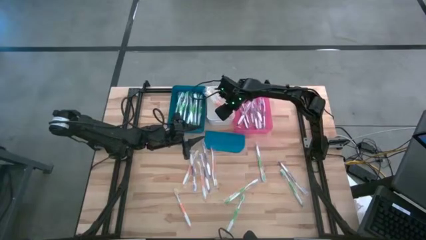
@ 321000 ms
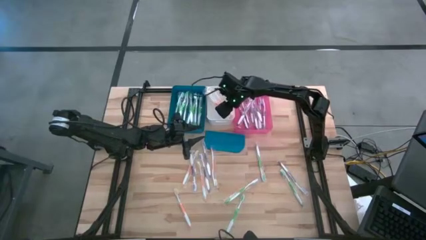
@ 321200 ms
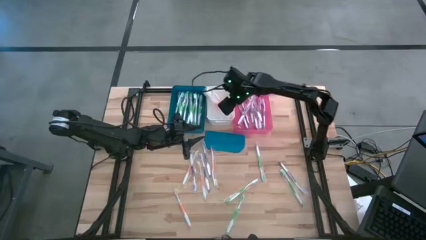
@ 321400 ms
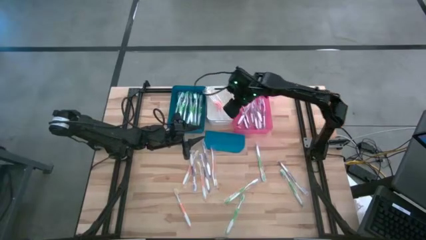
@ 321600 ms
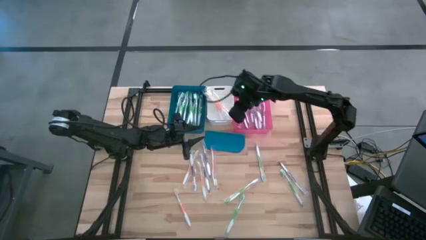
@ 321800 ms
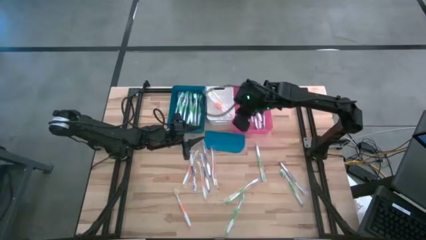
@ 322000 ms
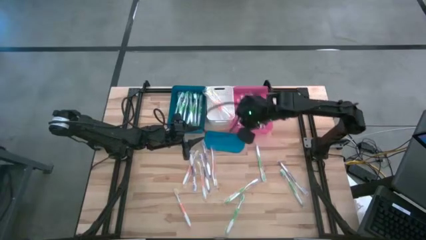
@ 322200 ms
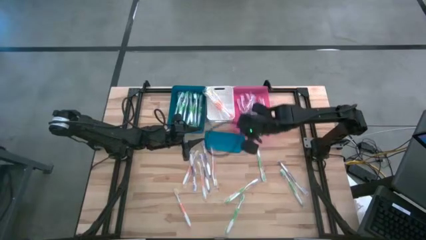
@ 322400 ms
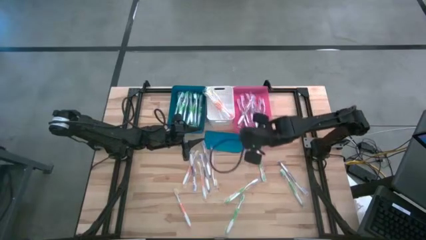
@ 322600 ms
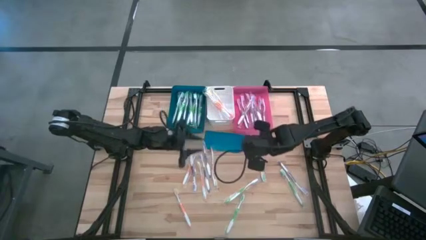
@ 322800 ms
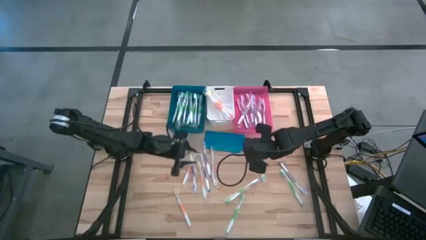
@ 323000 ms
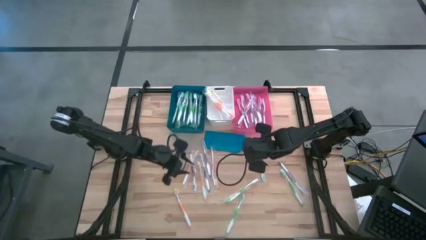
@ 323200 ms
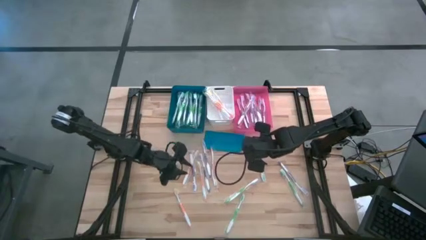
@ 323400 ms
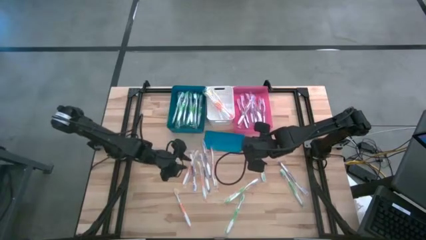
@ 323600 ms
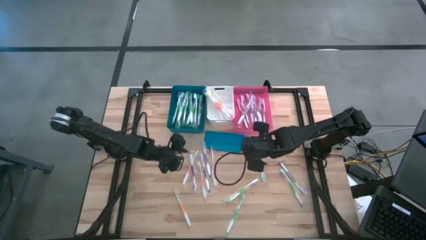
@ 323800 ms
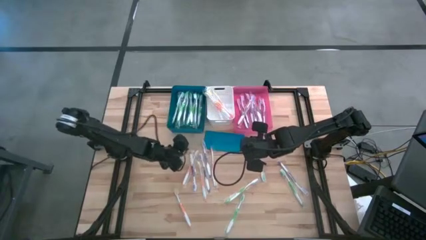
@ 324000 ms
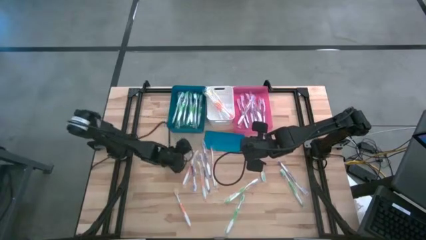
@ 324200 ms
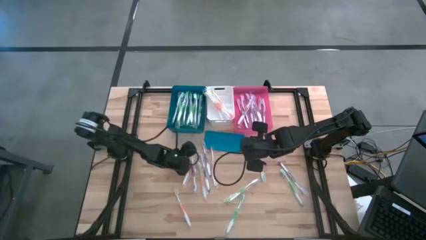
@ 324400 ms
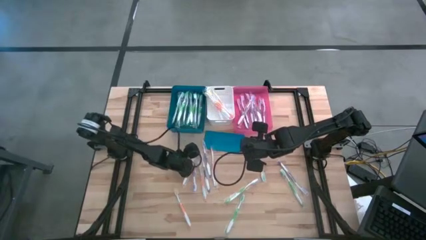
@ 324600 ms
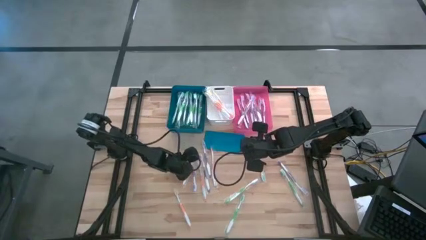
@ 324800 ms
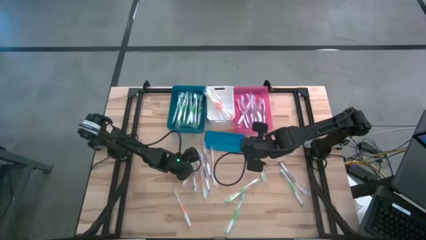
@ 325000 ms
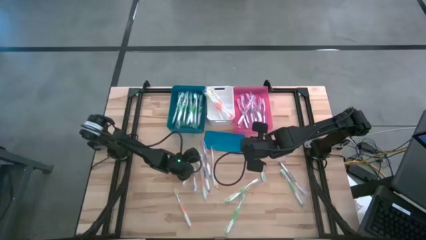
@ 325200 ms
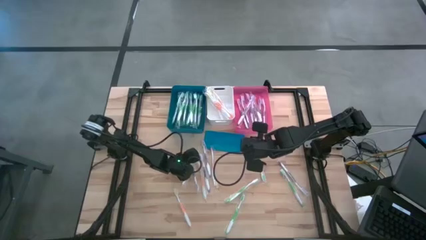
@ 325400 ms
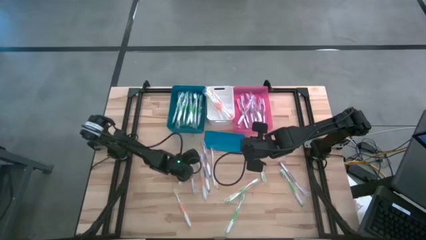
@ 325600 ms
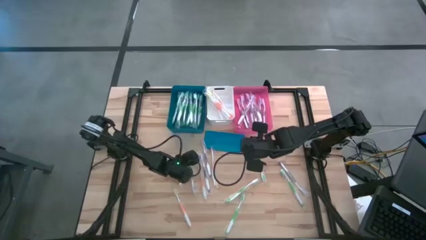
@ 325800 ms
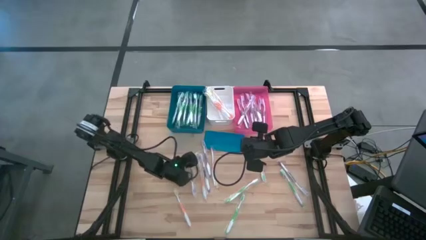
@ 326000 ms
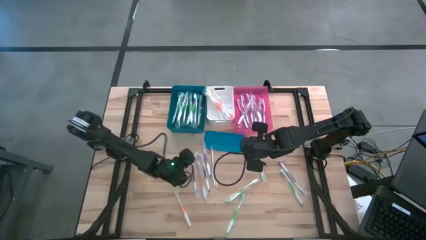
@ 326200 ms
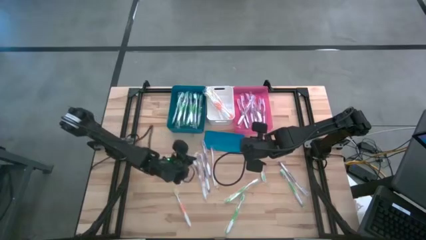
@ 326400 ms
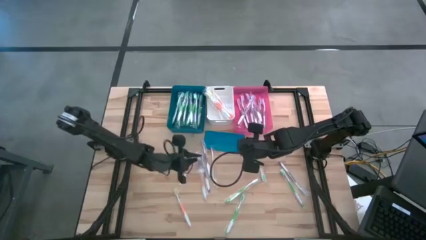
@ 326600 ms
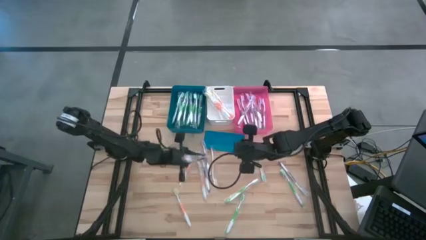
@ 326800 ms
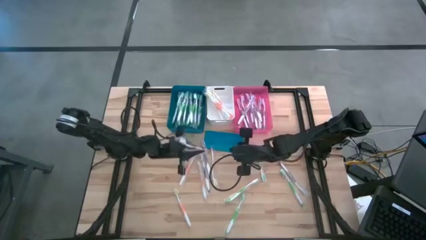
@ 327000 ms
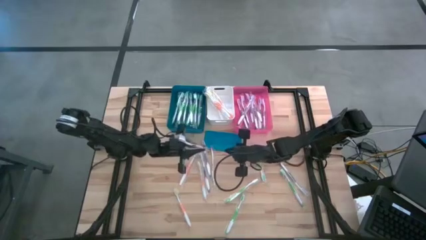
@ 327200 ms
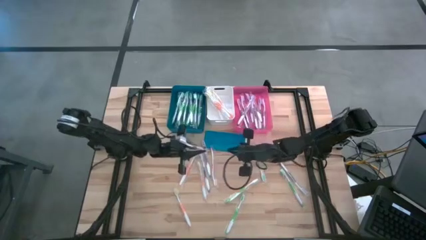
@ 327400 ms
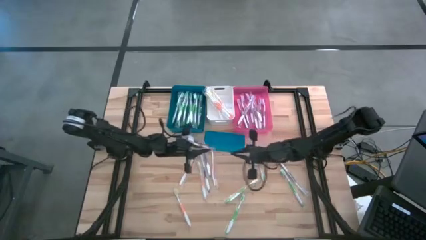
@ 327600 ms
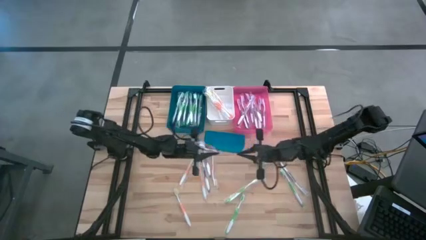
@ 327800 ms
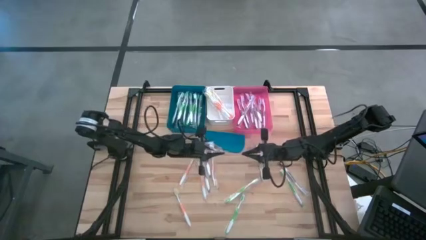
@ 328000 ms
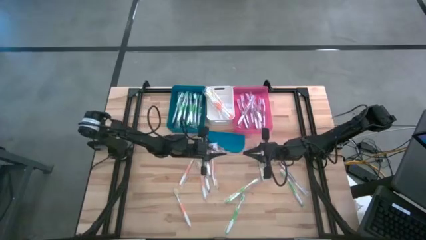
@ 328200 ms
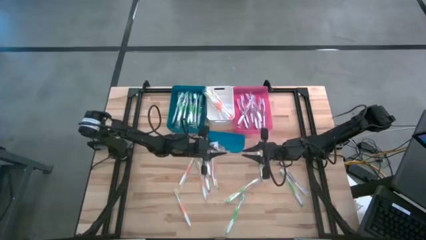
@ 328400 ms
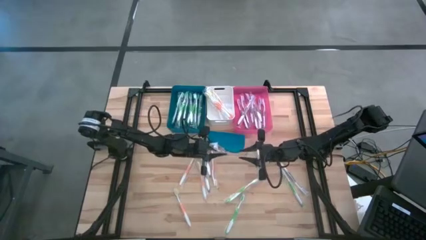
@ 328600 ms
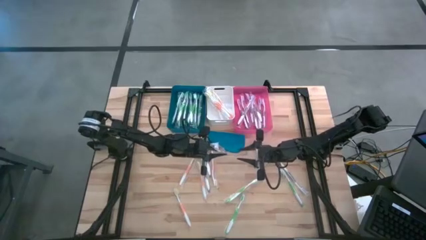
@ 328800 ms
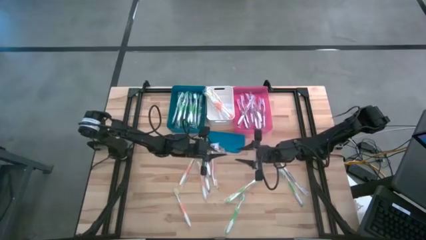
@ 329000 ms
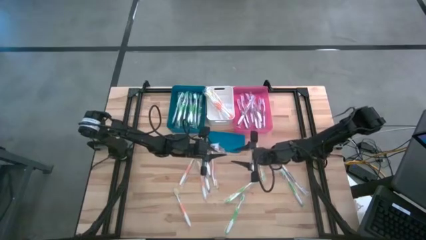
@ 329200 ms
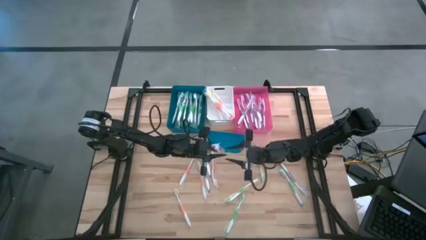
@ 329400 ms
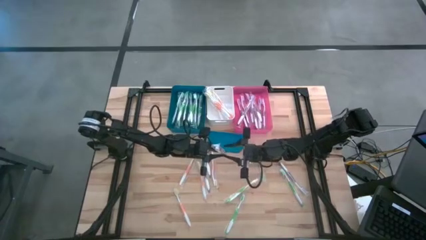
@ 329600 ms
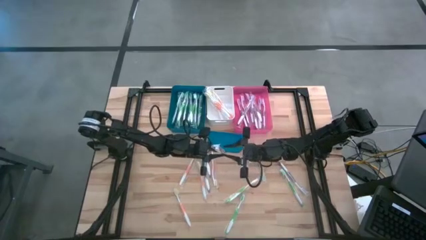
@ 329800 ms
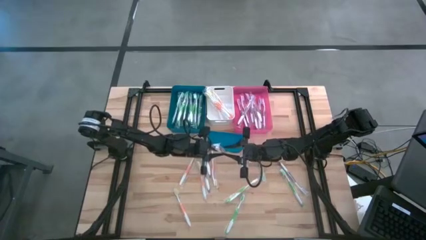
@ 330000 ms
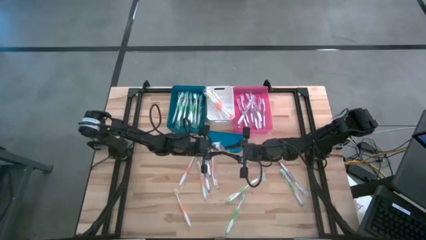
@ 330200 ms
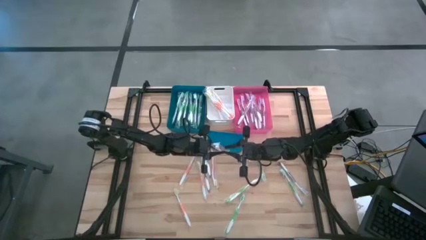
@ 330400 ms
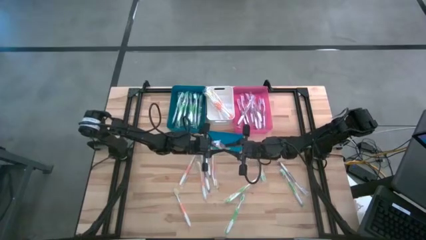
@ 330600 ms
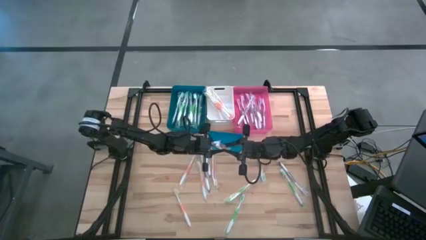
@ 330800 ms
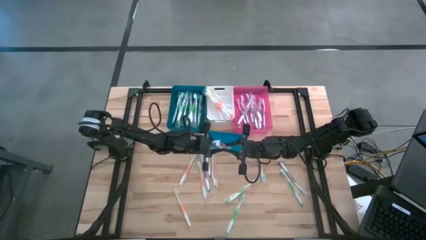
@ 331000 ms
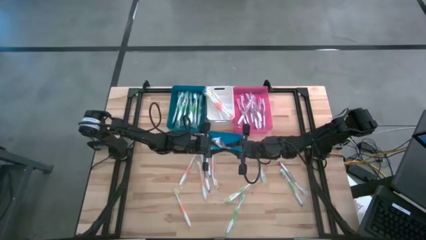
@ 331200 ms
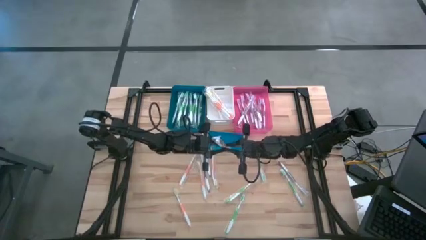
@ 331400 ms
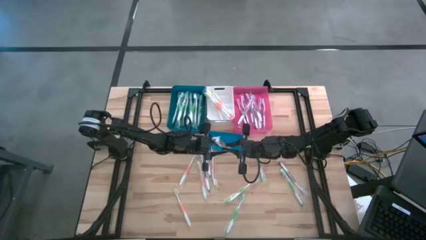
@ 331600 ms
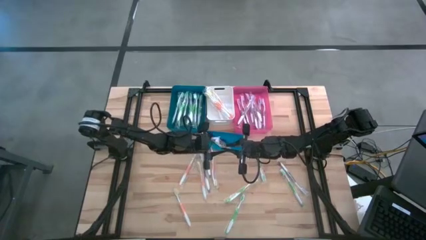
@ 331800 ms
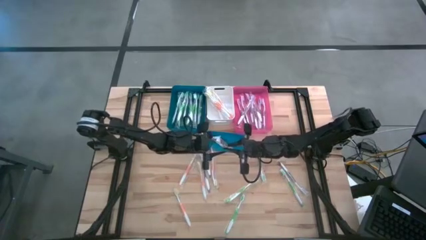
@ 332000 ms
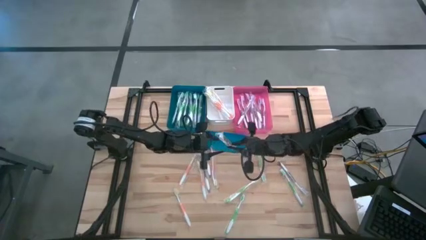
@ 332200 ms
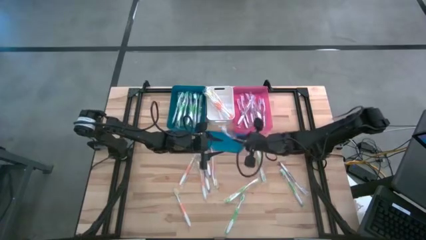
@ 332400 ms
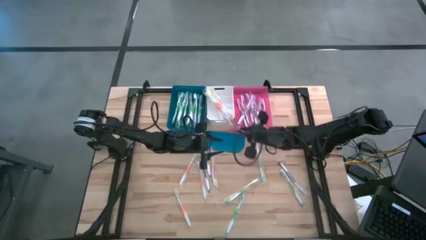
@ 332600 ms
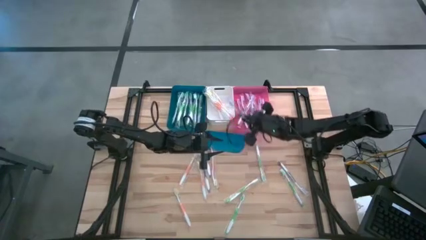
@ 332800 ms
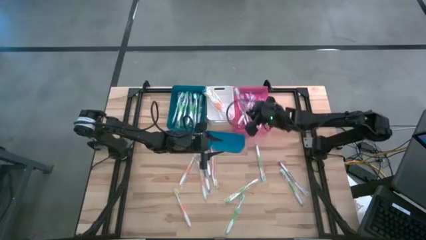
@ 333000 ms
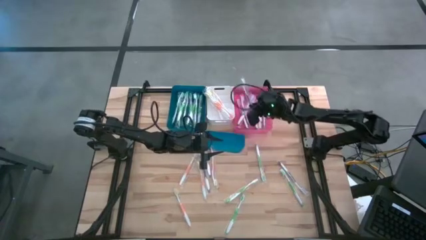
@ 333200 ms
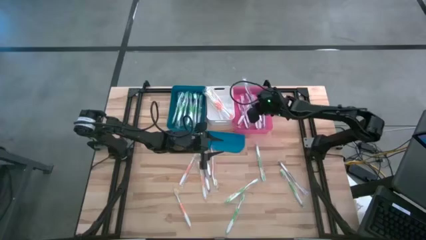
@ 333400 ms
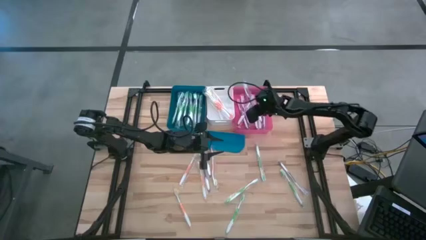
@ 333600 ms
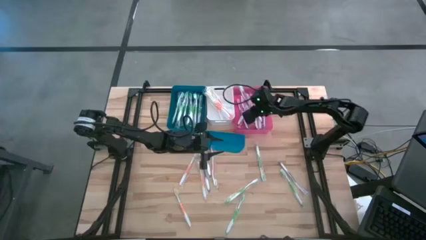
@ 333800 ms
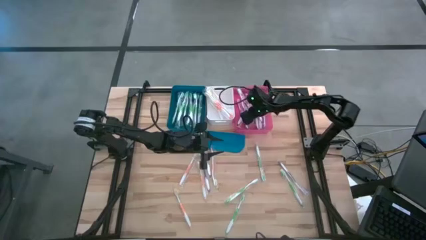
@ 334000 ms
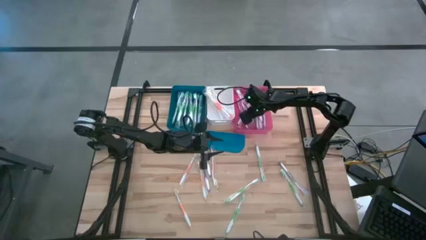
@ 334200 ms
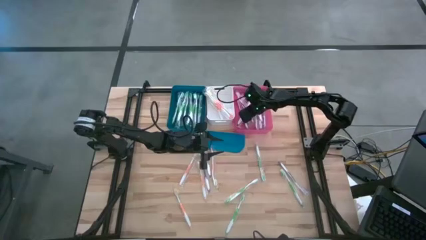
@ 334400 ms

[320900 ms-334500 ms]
Task: Pick & Place Toothbrushes
Put the purple toothbrush into the pink bin
